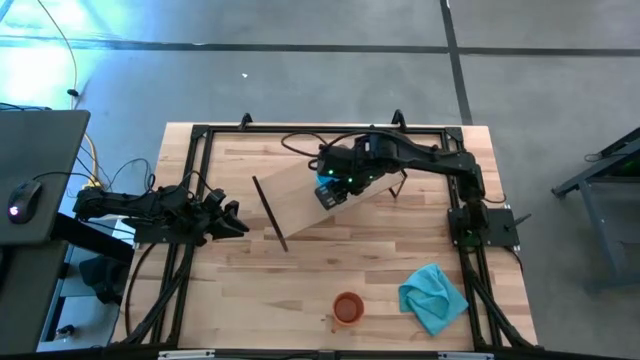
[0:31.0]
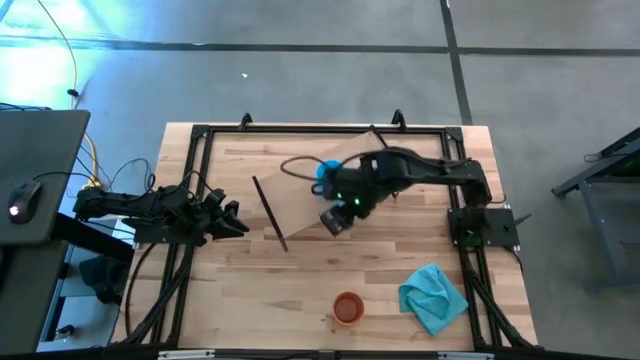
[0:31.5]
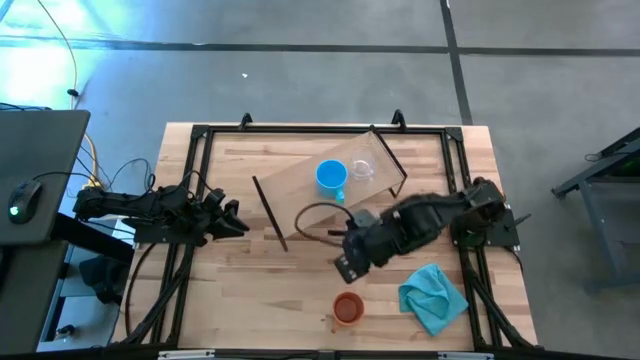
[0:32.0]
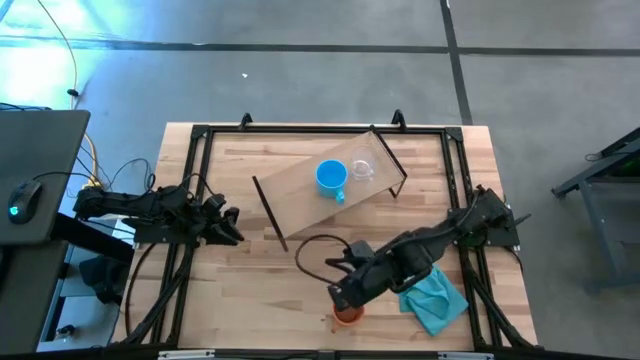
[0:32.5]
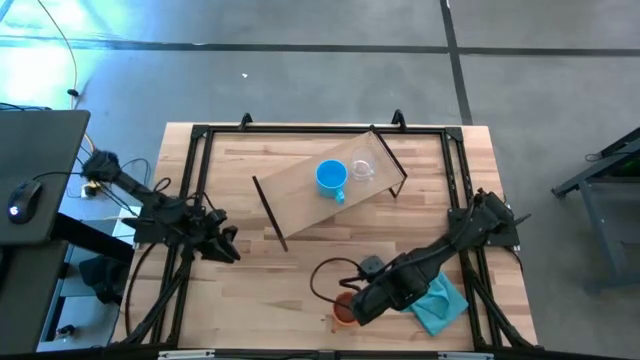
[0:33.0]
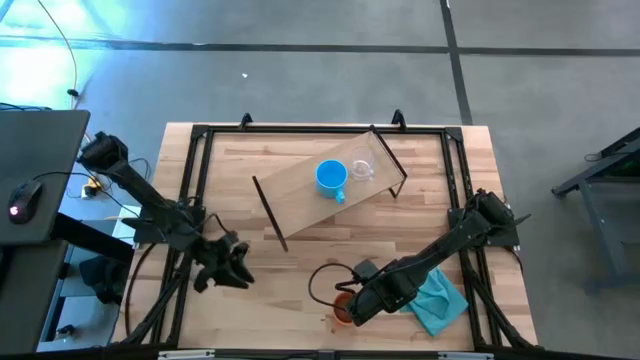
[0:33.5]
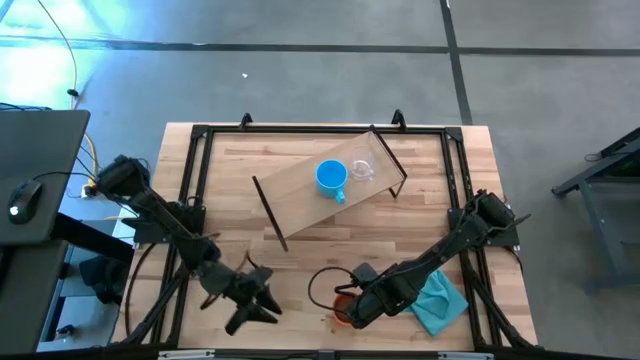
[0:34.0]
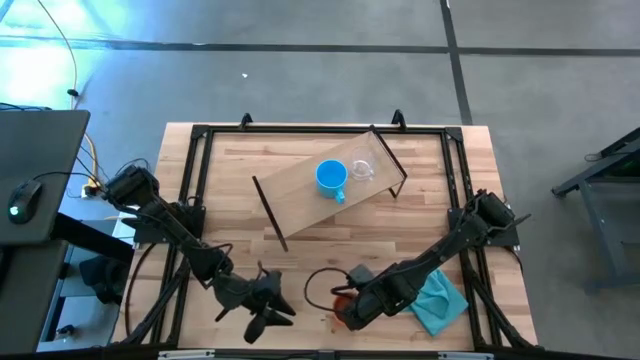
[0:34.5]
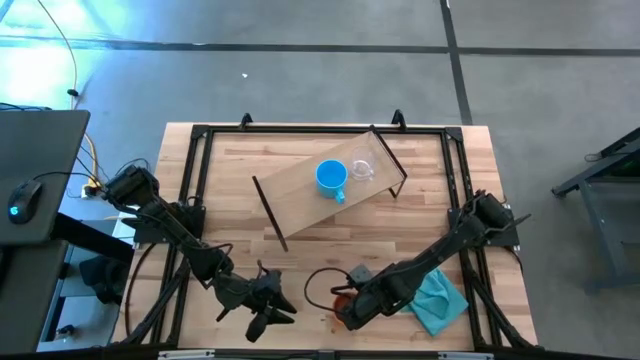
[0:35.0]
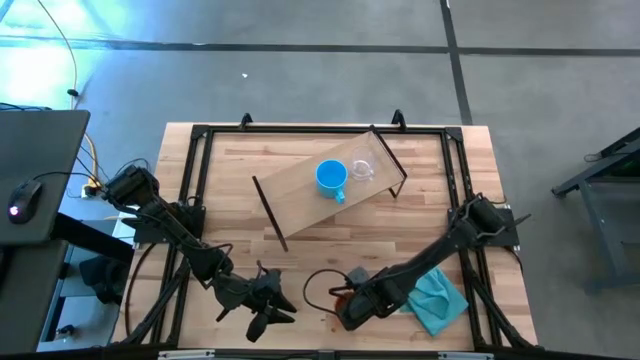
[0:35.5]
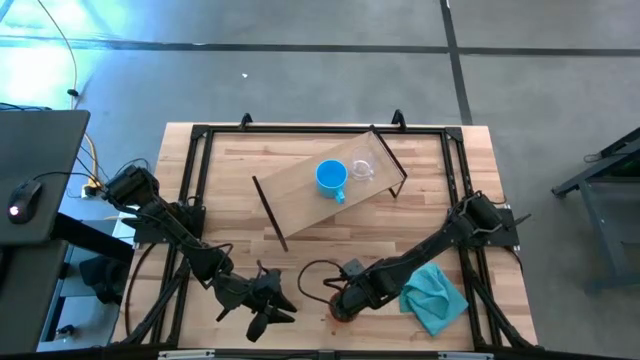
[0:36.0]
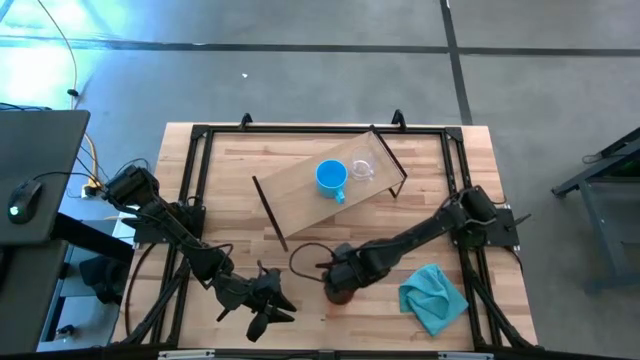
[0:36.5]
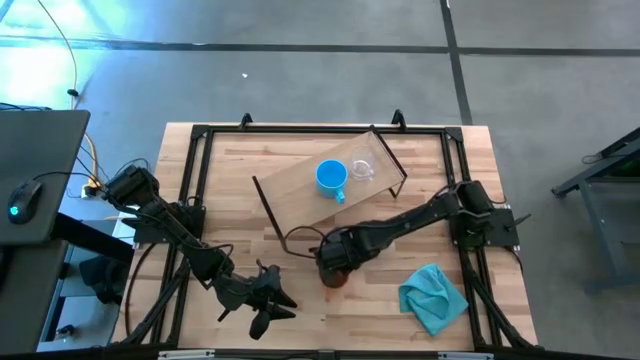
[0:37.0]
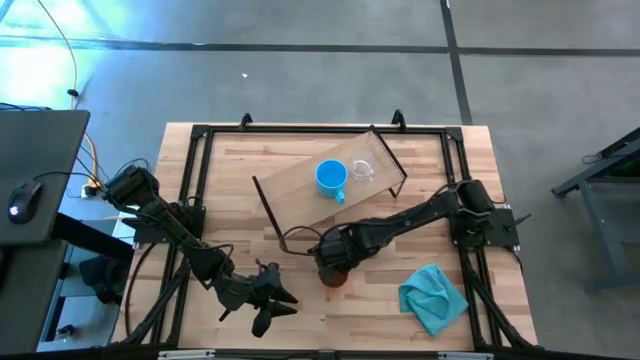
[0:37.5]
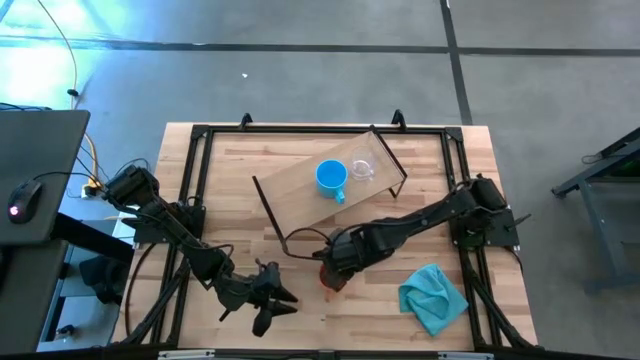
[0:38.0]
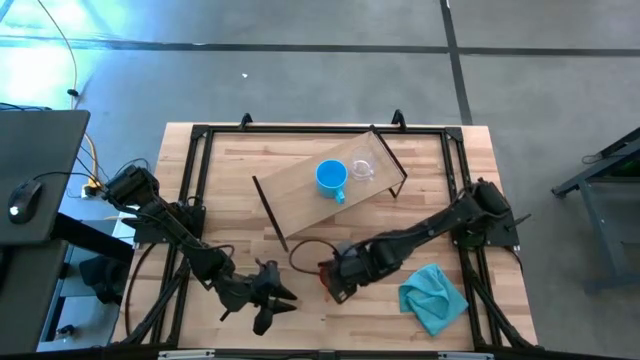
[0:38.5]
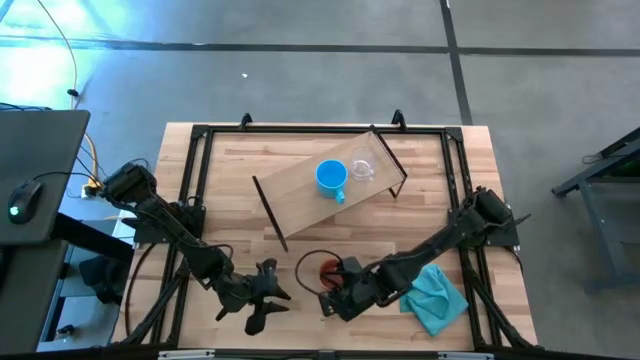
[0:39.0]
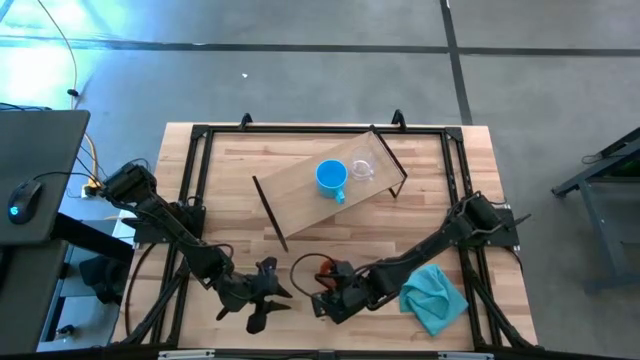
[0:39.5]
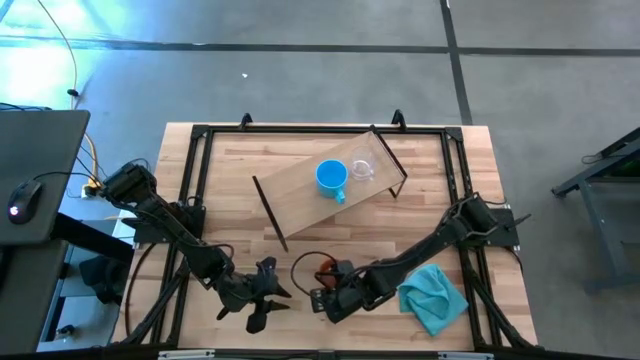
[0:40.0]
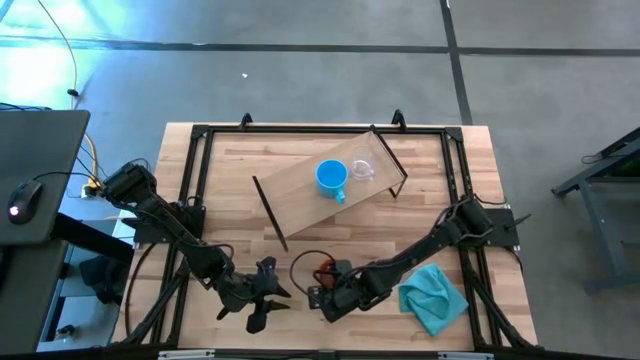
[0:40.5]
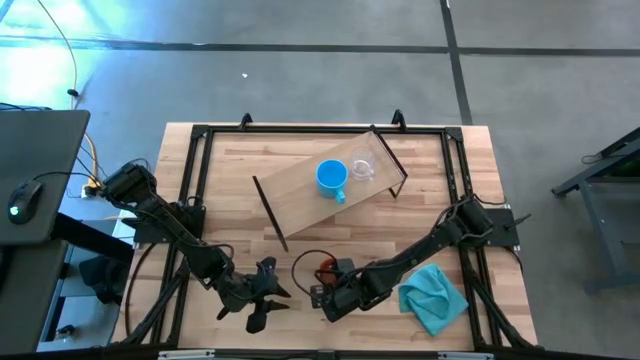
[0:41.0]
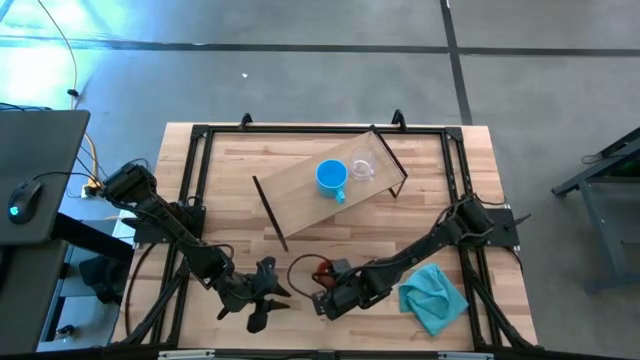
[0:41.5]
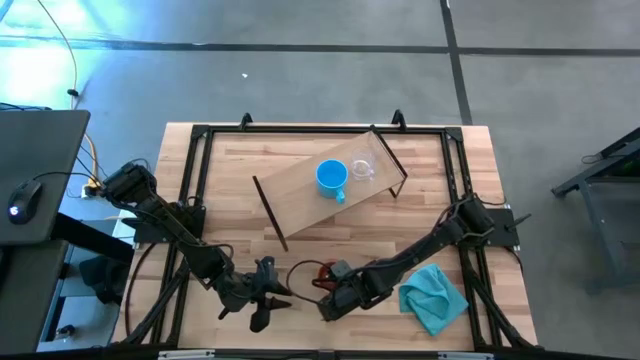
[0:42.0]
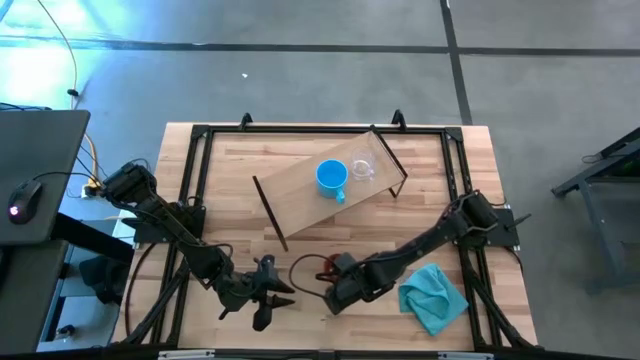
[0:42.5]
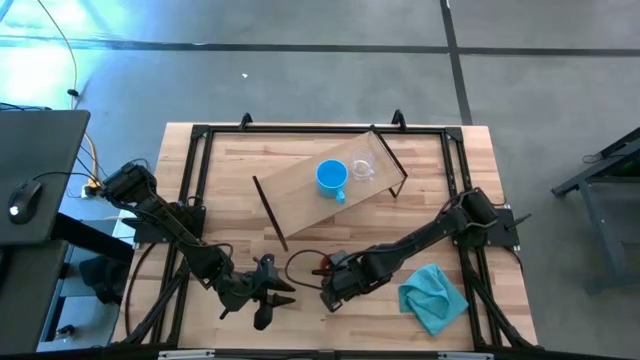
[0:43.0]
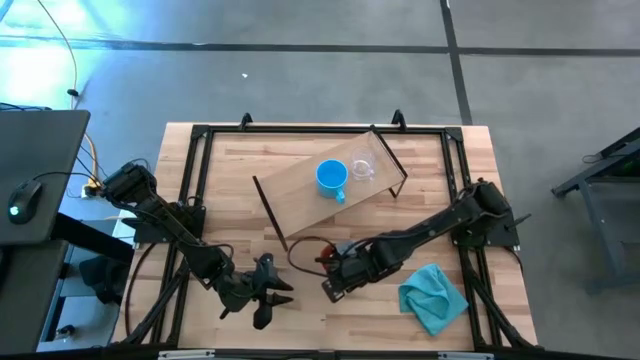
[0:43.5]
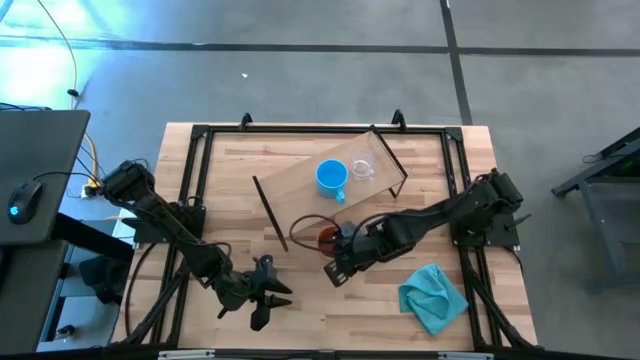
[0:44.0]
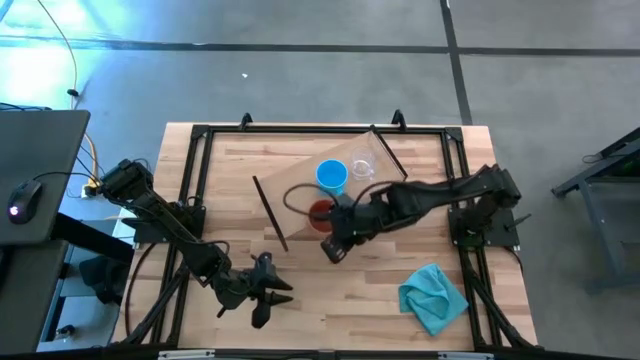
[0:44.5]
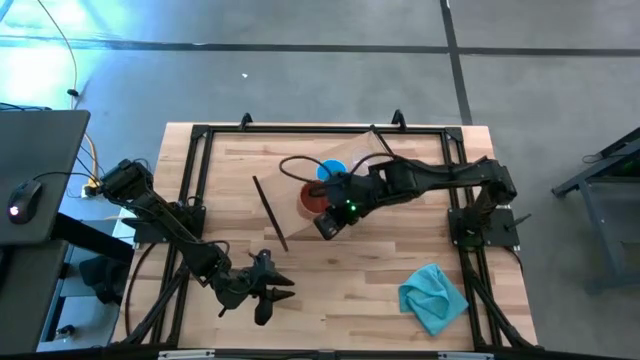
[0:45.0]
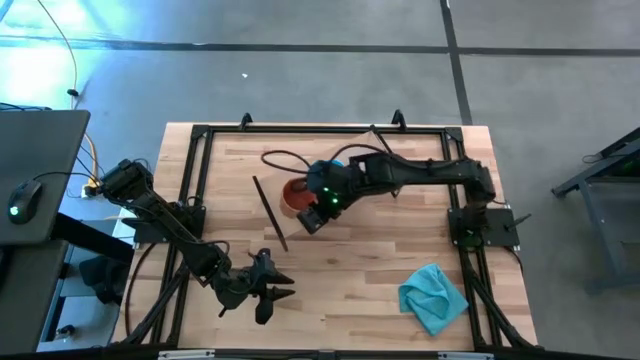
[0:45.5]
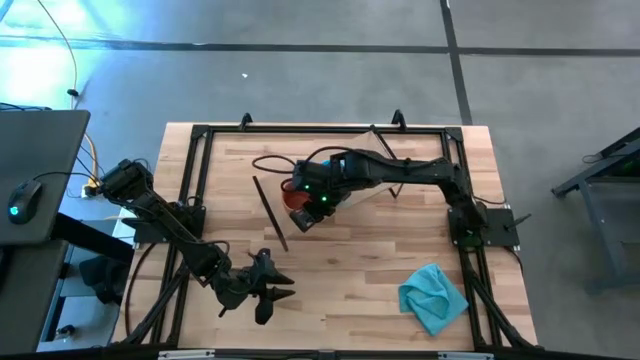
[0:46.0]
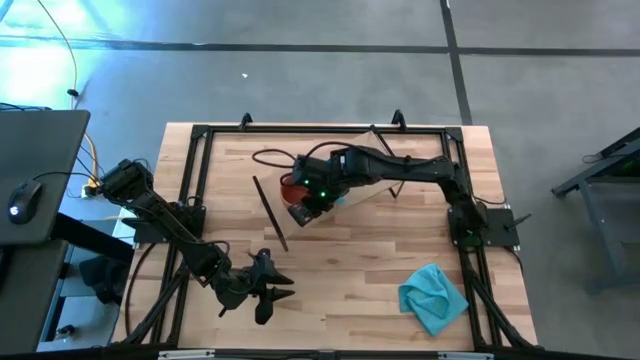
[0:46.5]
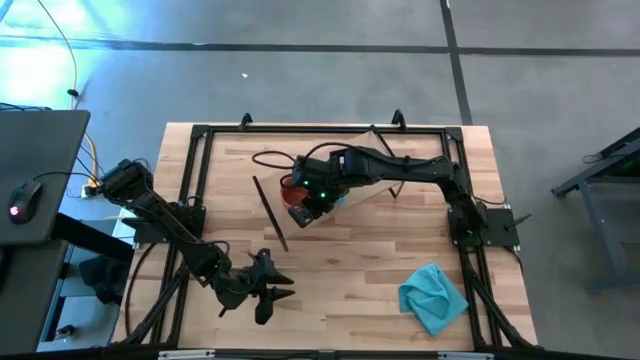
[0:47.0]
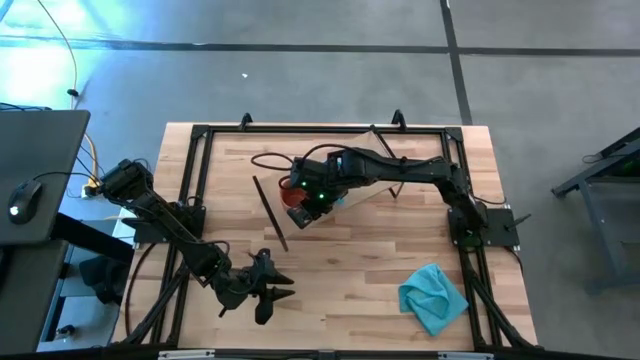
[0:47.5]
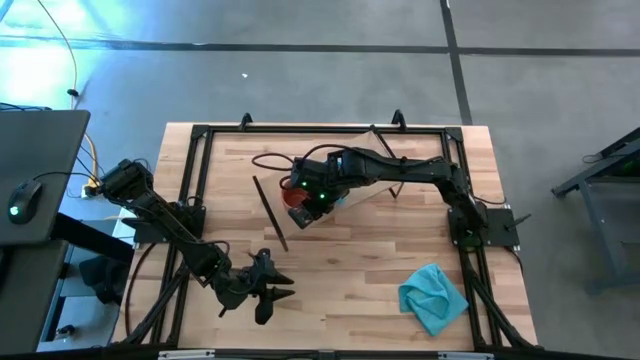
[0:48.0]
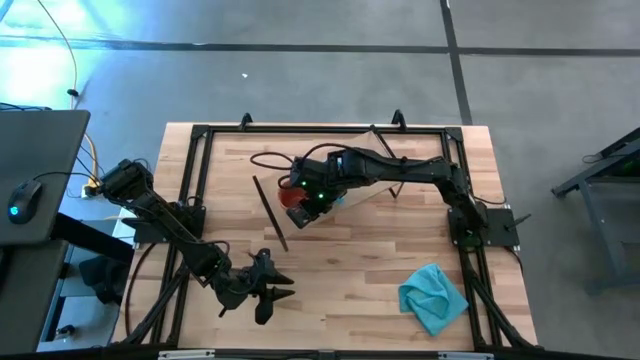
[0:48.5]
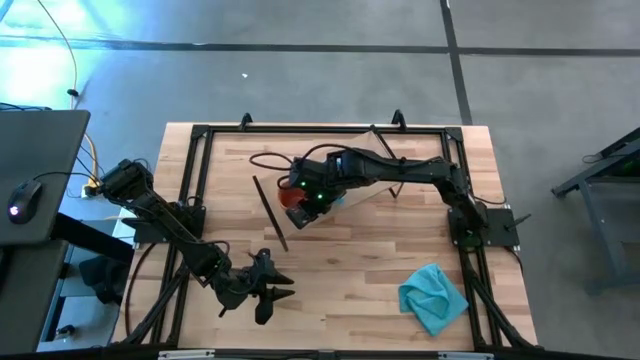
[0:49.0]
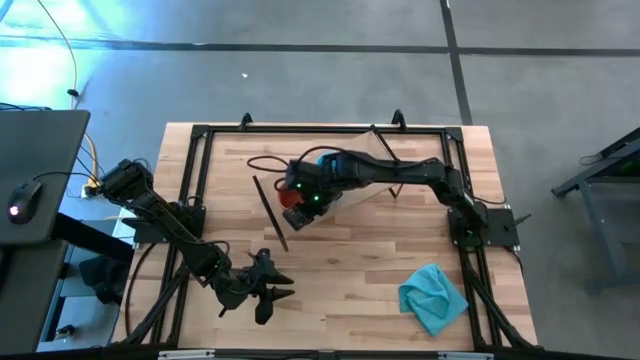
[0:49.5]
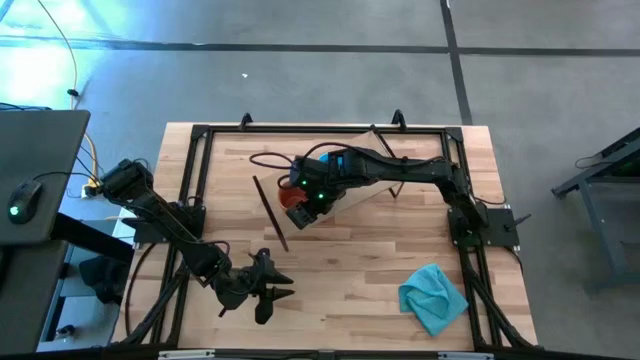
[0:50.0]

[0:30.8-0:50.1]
Task: Stack small to large cups/mugs on shelf
Put the orange mug on the shelf

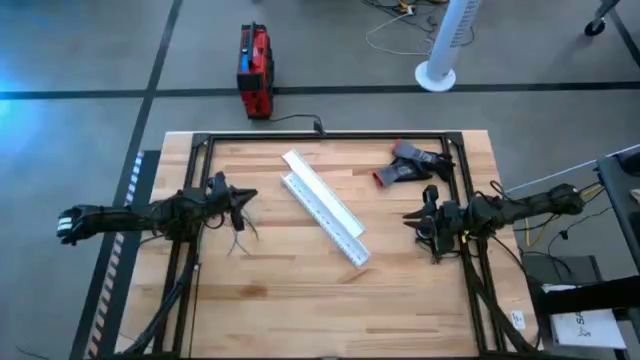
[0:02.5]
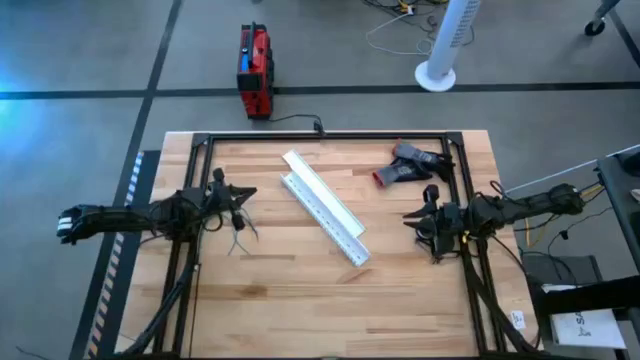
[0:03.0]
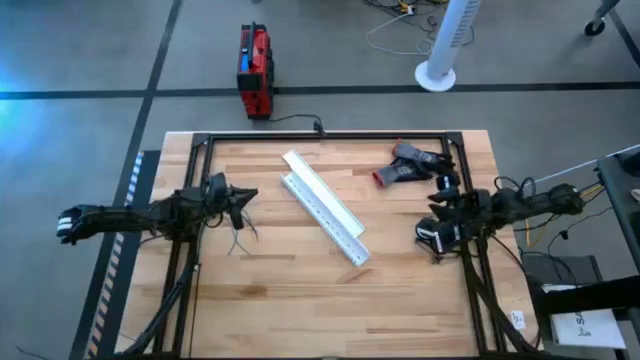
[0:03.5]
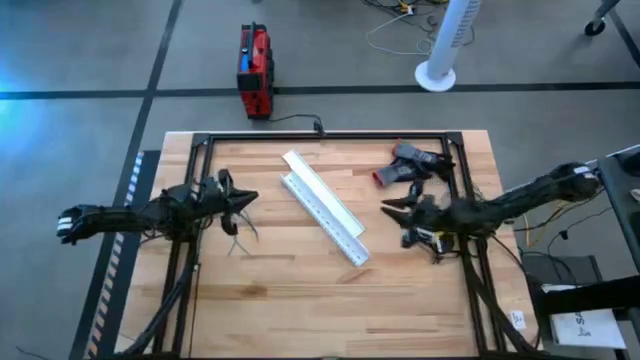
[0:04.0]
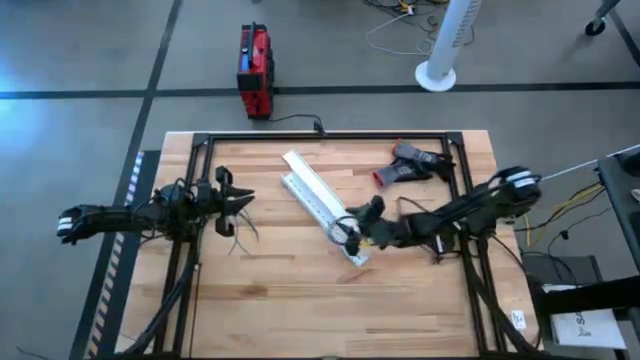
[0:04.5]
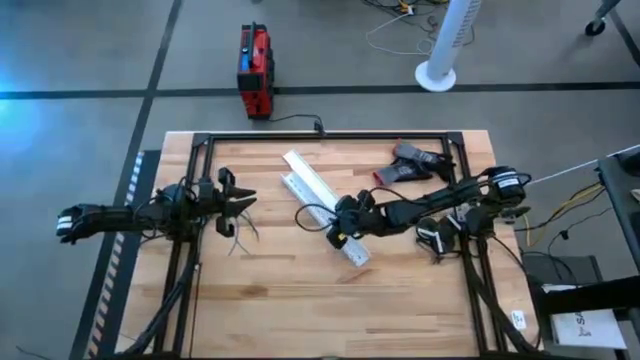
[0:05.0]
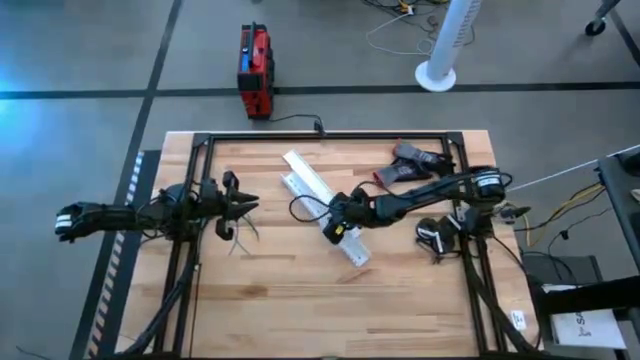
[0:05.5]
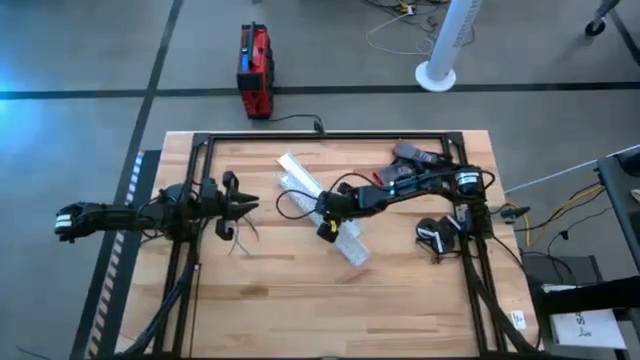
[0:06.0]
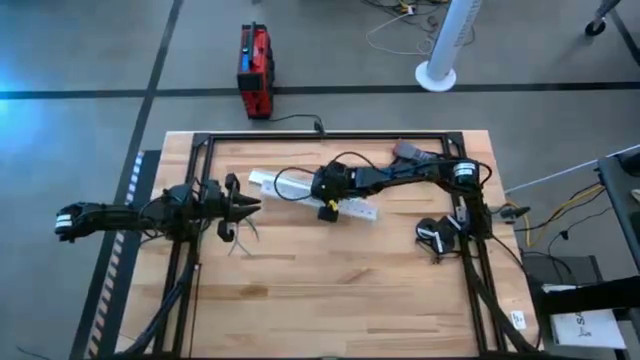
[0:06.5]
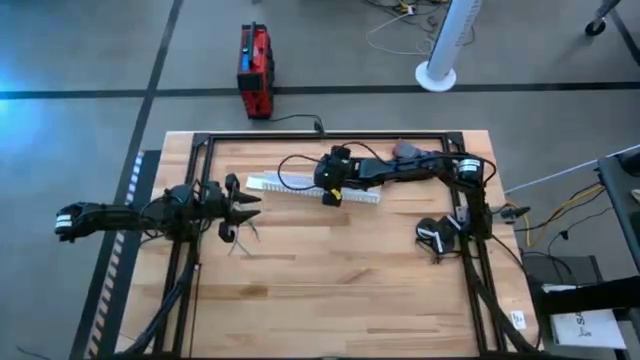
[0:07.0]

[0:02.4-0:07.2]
Task: Ziptie cables
Adjust the white cable duct to the top center
